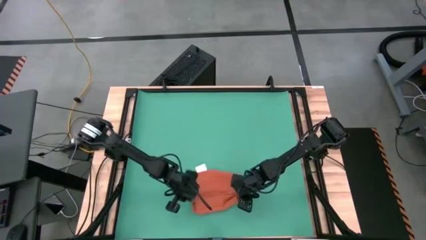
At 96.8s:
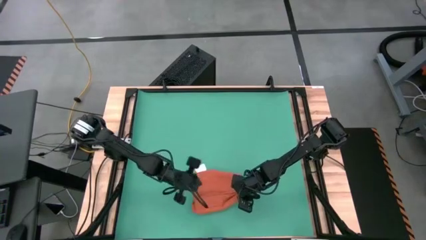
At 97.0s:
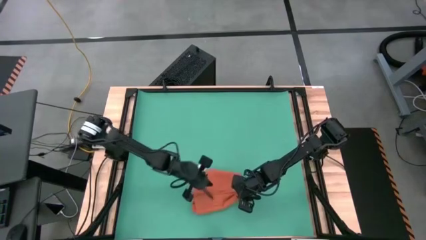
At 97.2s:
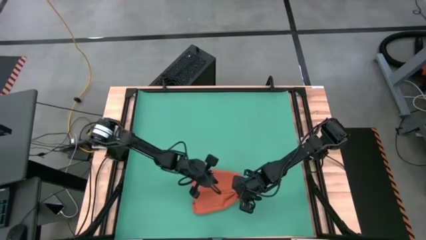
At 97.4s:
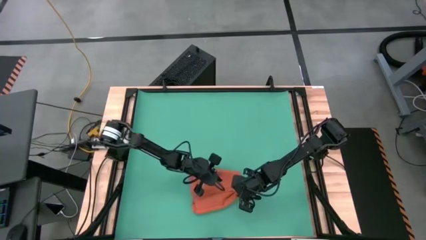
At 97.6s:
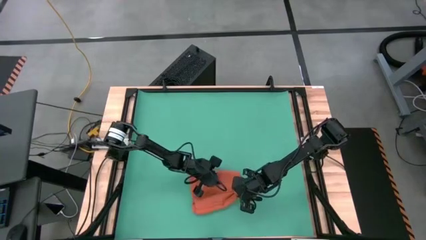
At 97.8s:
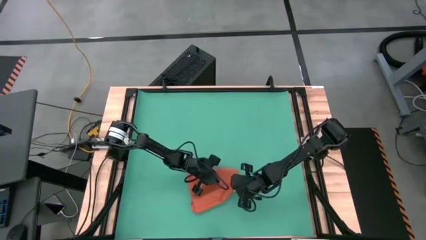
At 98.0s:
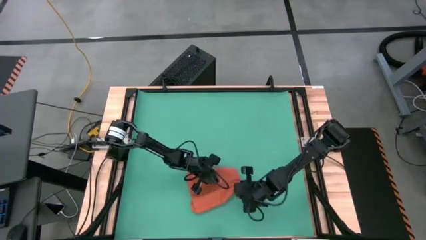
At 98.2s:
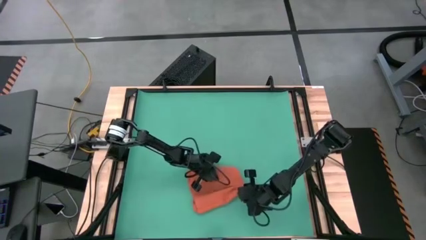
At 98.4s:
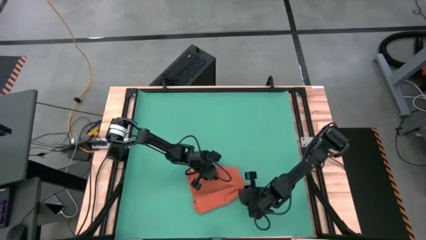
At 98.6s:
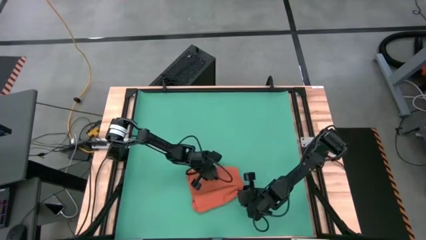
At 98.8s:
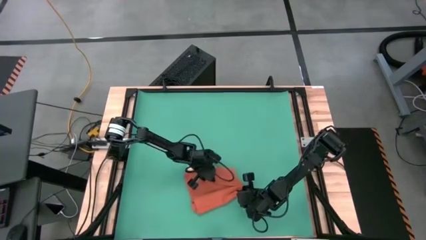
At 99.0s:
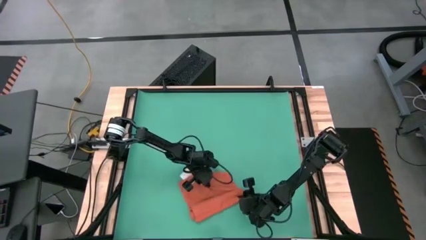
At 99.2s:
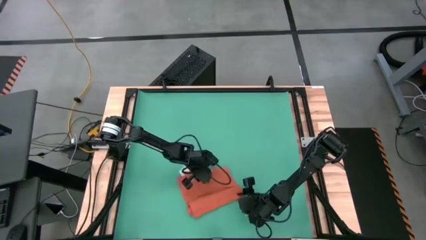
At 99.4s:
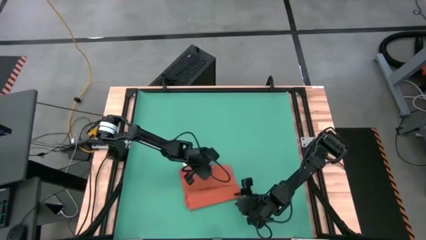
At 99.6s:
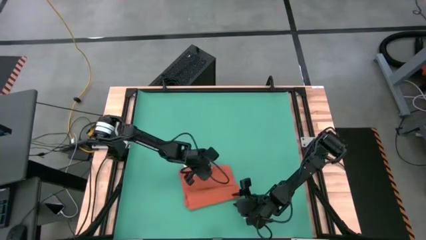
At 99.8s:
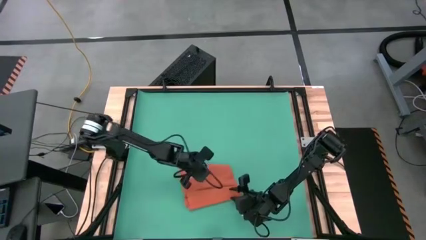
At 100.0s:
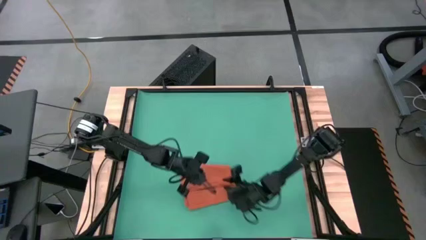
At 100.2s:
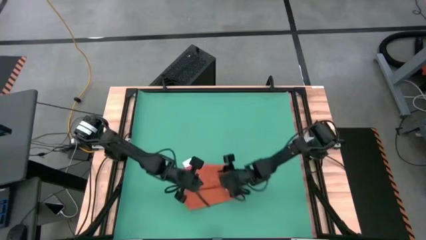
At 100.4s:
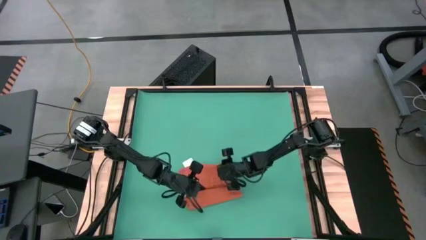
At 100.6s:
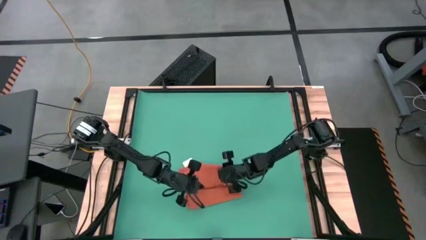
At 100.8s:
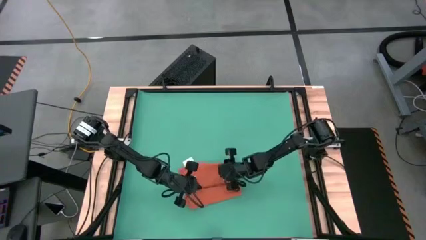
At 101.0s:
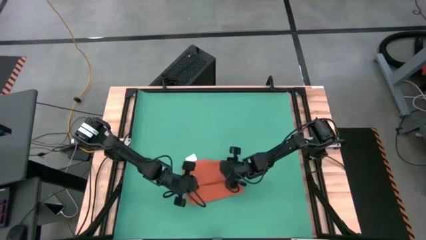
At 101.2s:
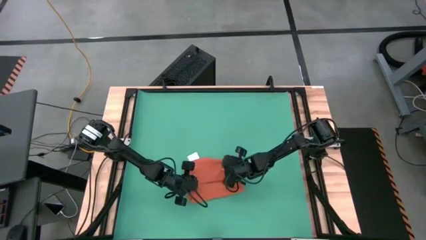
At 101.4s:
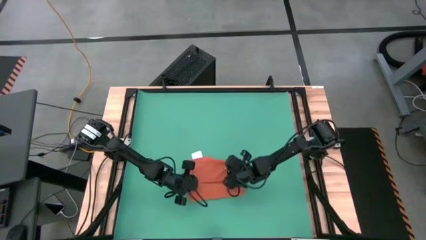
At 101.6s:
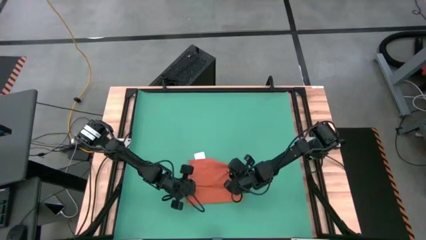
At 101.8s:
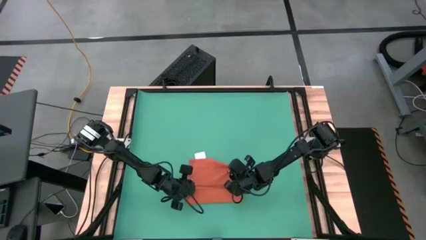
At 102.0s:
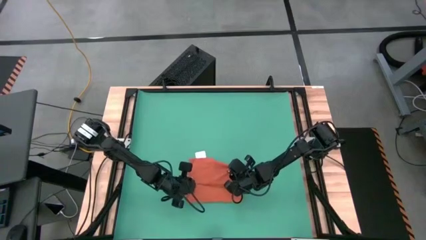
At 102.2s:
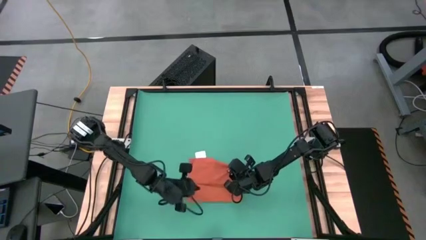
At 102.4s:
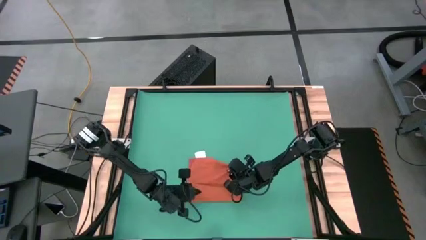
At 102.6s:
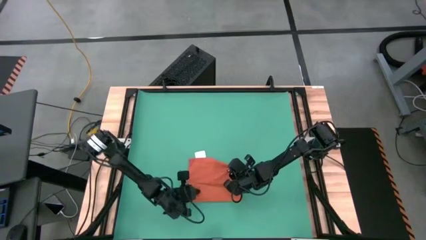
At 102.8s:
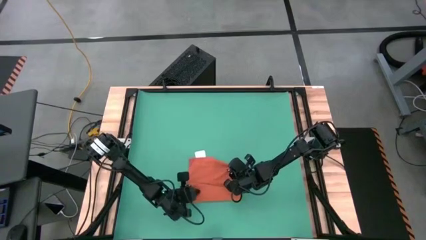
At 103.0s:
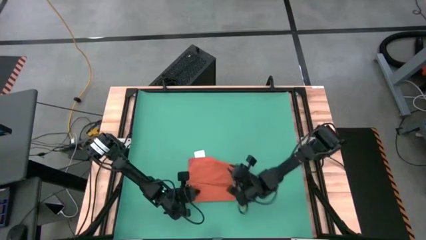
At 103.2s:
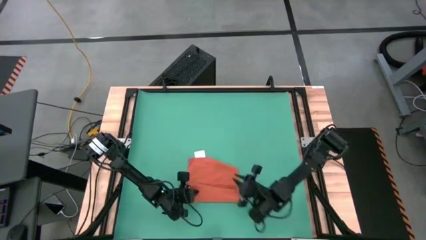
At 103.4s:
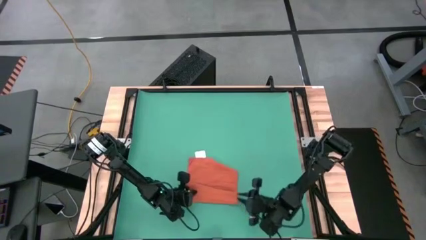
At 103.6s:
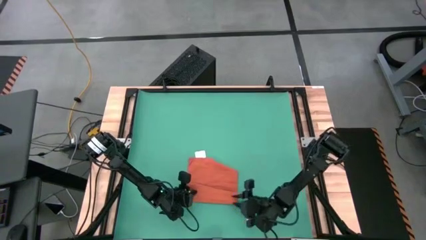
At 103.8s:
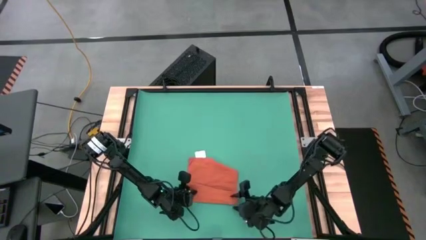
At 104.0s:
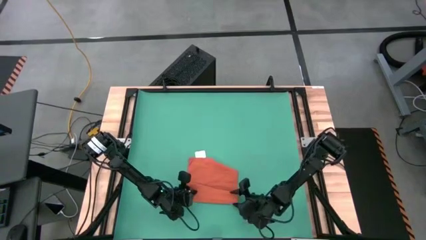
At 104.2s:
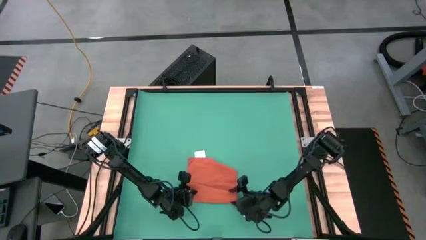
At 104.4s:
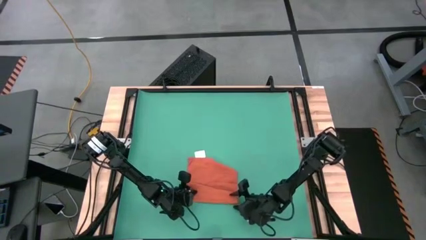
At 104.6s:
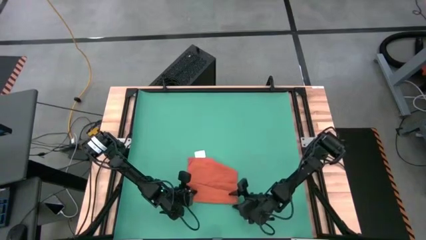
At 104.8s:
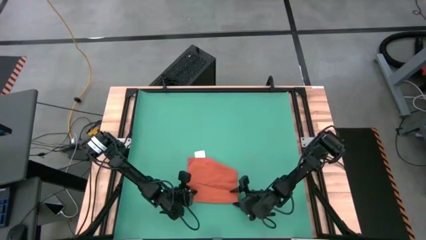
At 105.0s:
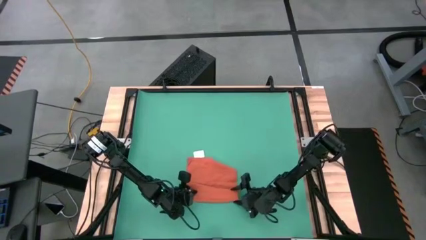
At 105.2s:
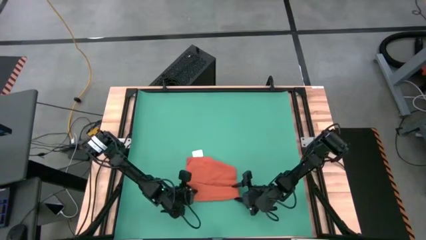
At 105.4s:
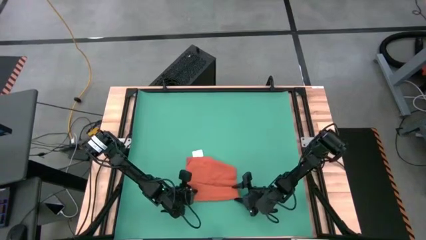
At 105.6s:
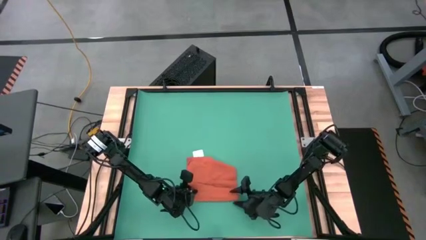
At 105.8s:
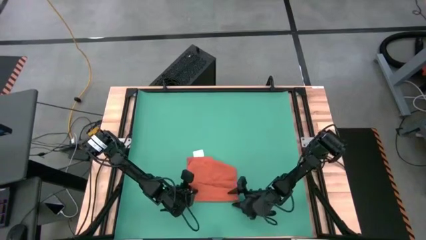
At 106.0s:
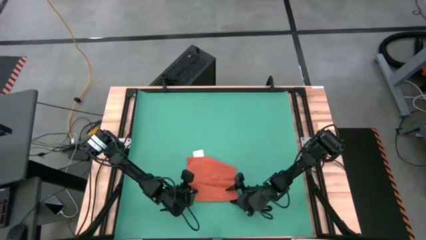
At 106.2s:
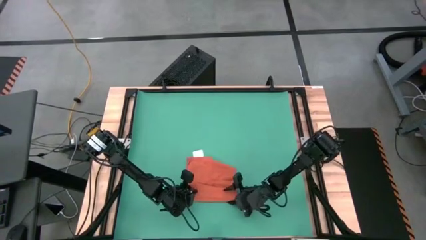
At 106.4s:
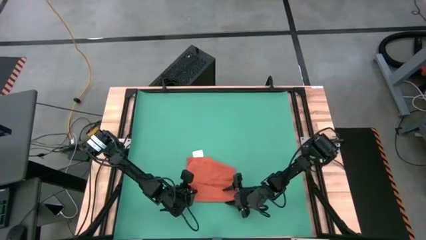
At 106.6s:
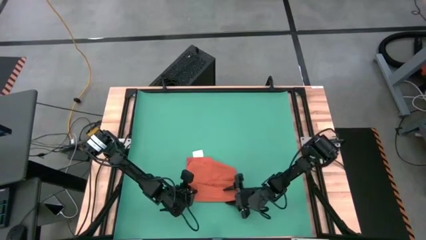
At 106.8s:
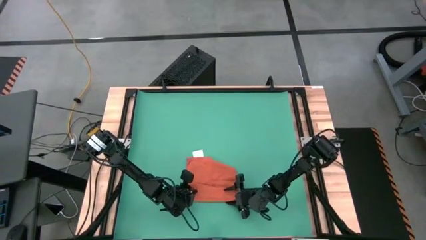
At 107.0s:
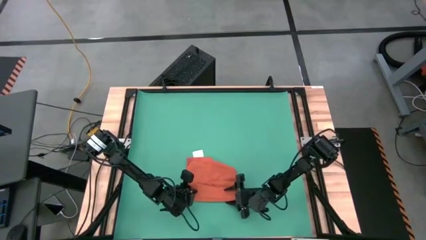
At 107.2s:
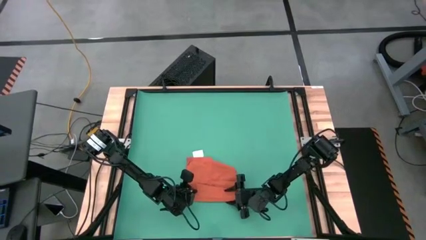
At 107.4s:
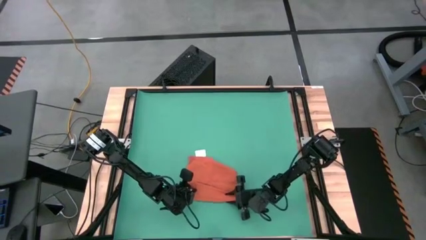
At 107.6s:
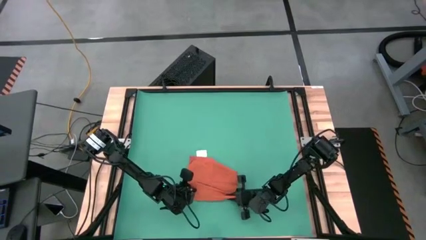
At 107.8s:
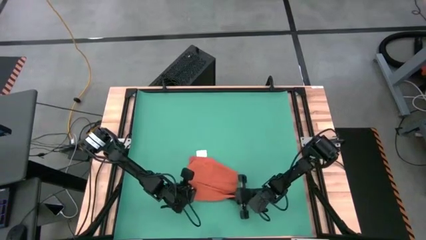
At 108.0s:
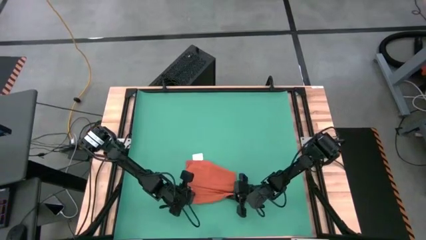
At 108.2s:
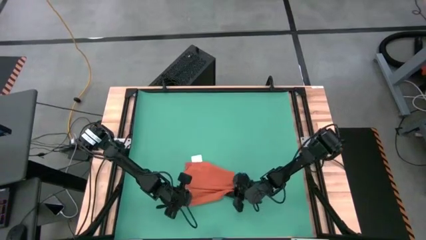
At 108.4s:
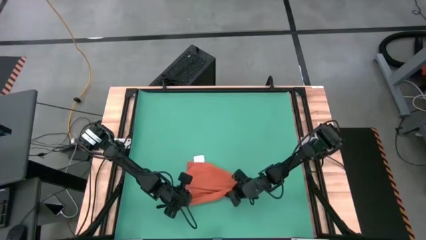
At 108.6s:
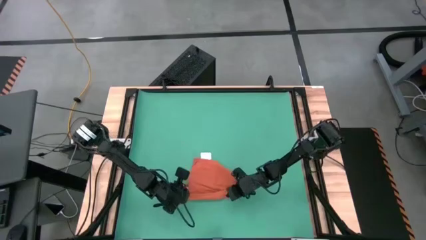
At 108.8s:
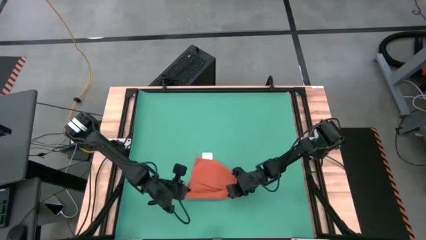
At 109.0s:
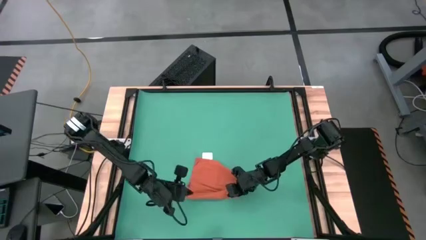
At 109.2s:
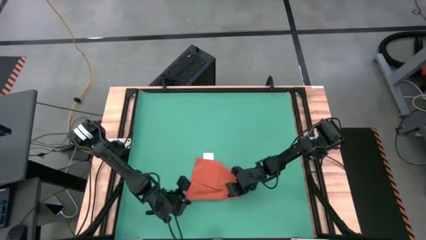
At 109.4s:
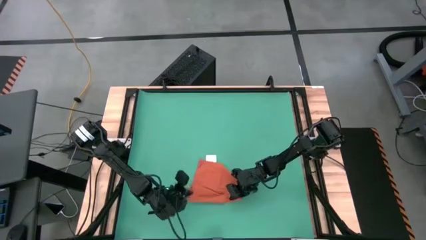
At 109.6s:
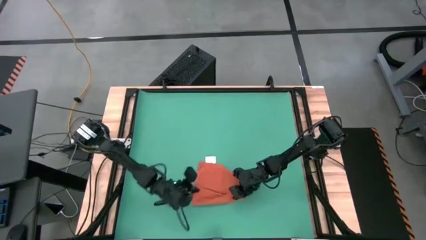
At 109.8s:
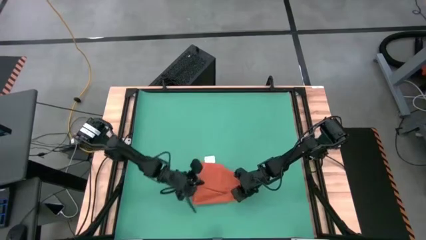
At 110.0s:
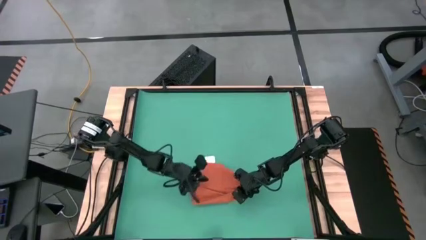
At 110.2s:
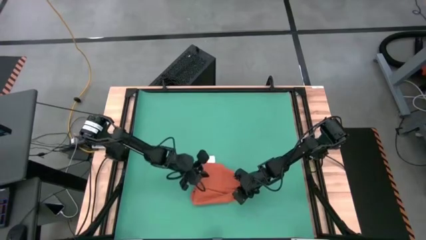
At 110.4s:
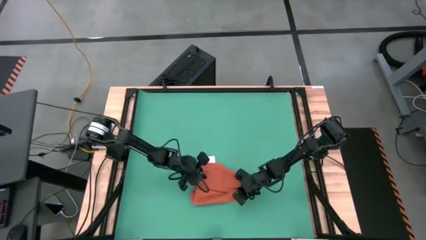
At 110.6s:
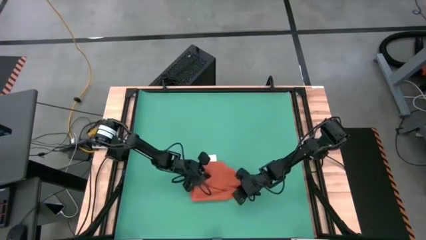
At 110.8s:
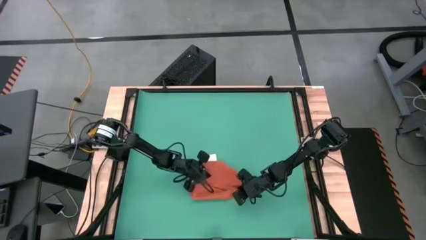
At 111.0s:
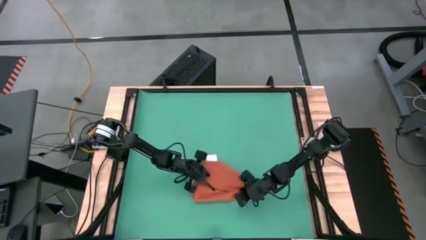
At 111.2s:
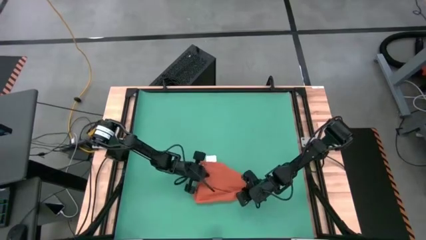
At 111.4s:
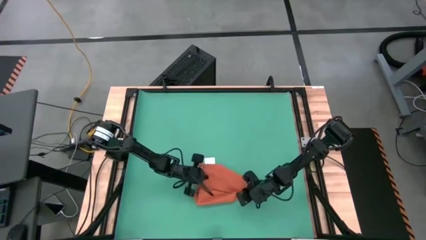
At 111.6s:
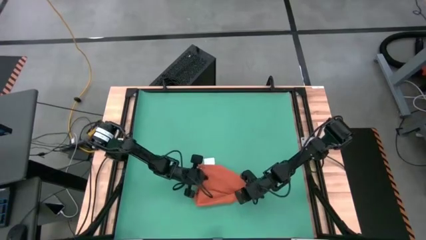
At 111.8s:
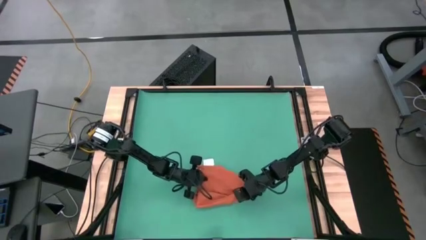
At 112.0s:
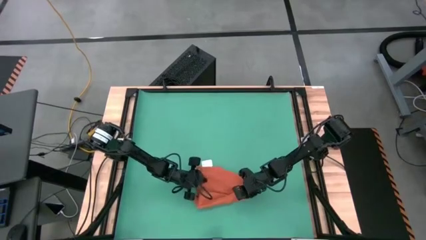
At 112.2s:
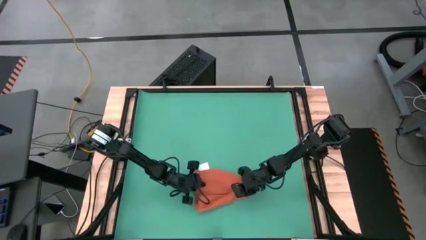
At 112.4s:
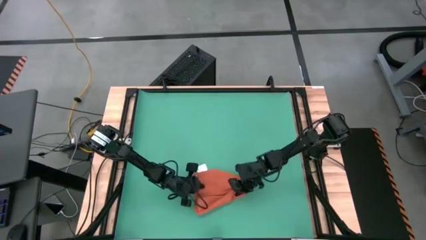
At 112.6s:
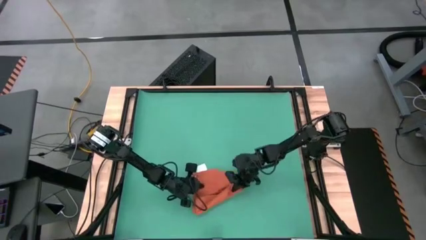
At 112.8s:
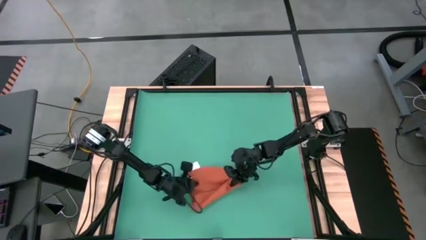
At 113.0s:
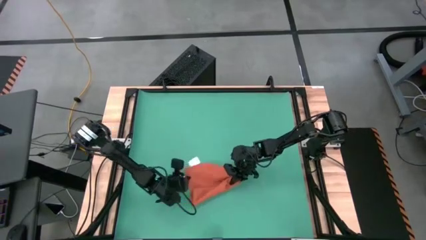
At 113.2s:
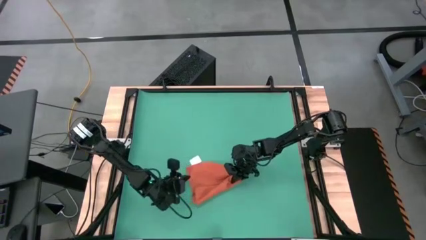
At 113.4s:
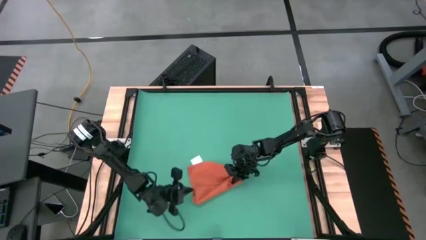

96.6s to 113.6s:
Task: Roll towel into tight, uniform cylinder
Roll the orange towel
